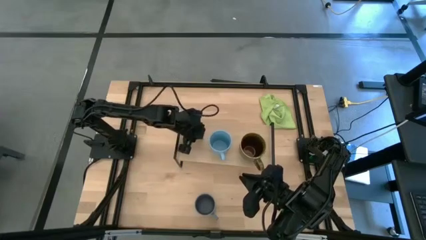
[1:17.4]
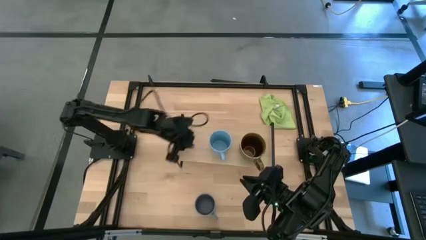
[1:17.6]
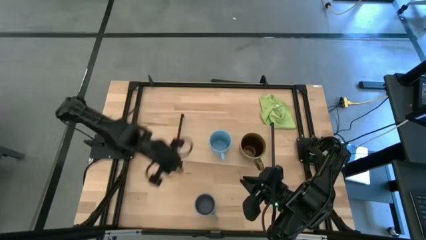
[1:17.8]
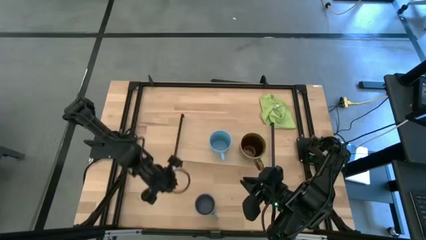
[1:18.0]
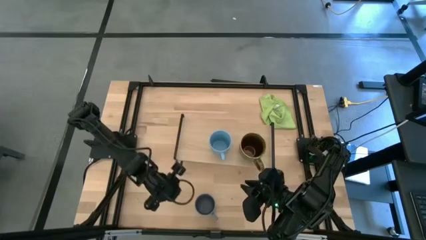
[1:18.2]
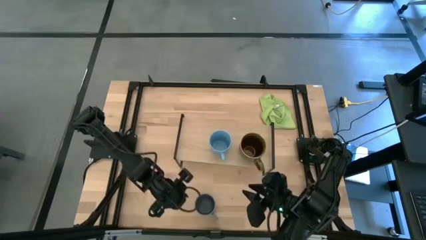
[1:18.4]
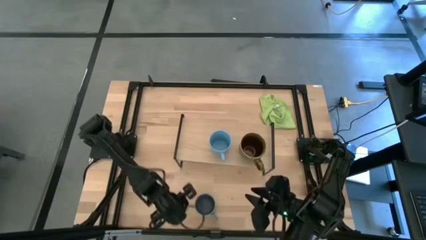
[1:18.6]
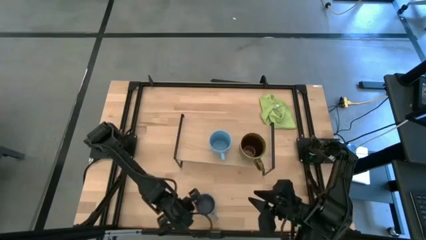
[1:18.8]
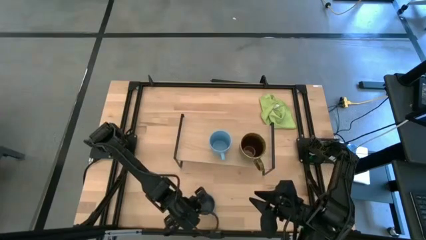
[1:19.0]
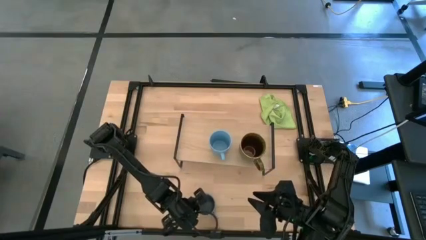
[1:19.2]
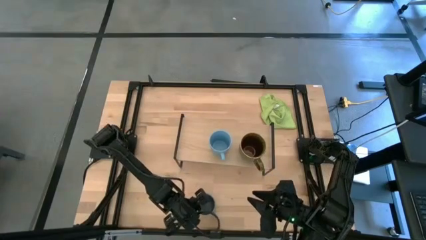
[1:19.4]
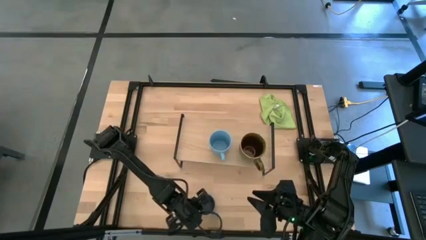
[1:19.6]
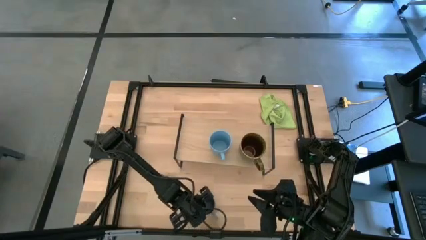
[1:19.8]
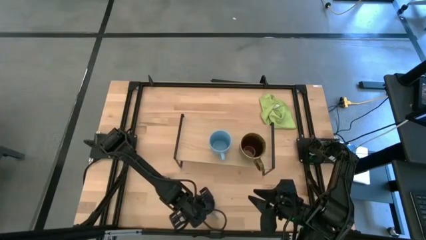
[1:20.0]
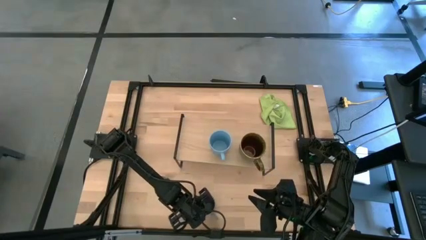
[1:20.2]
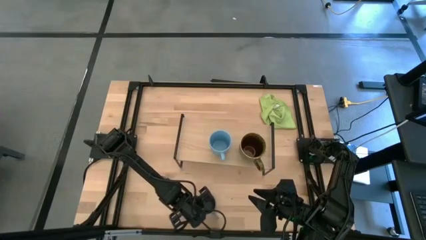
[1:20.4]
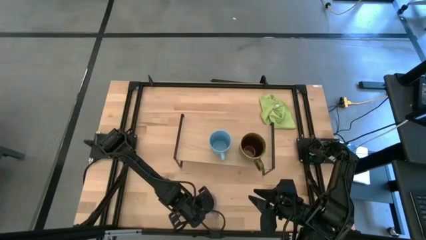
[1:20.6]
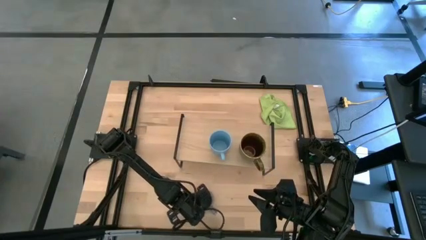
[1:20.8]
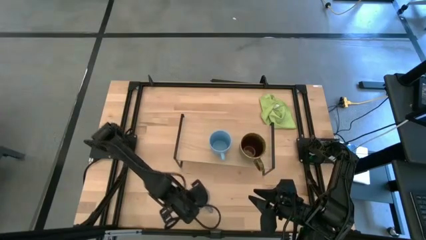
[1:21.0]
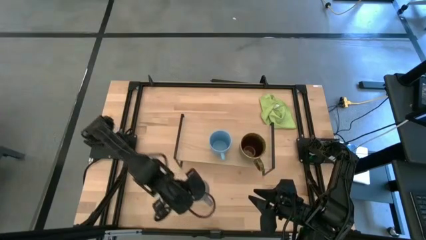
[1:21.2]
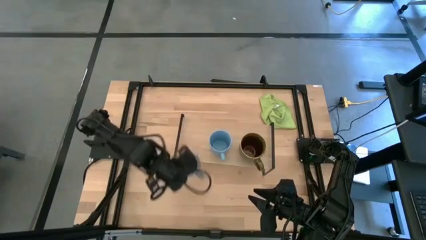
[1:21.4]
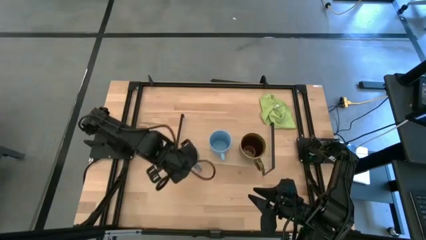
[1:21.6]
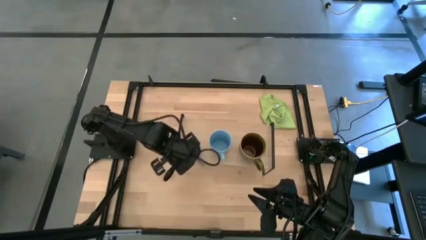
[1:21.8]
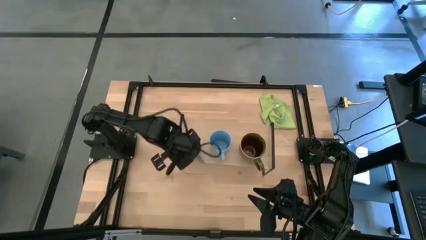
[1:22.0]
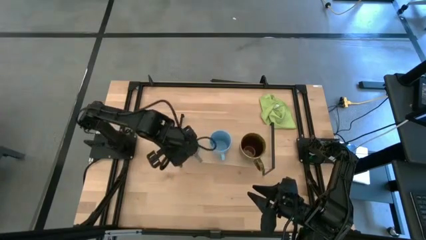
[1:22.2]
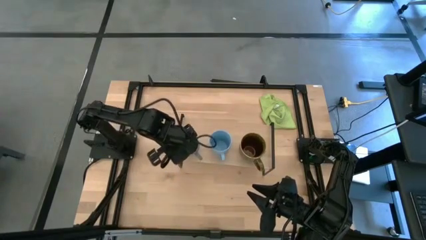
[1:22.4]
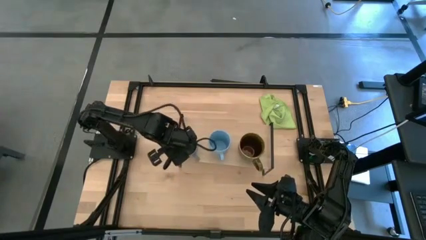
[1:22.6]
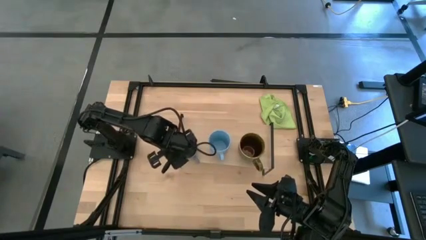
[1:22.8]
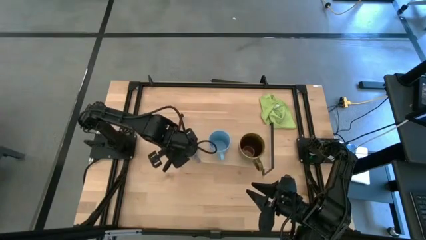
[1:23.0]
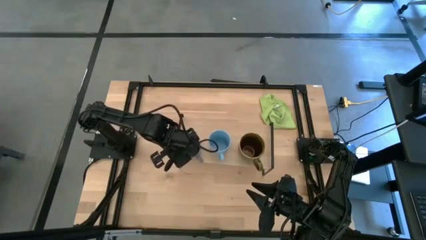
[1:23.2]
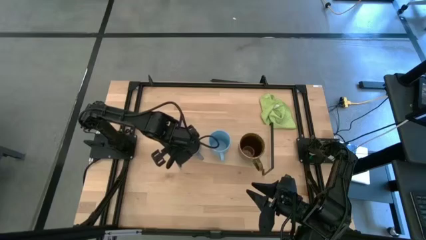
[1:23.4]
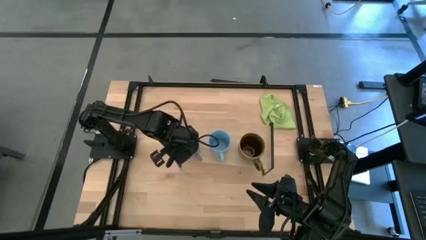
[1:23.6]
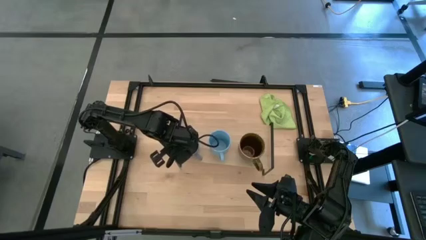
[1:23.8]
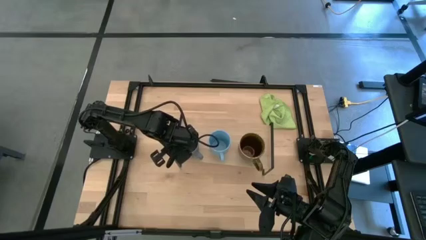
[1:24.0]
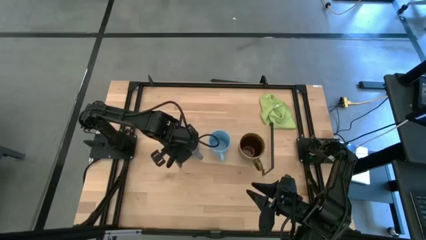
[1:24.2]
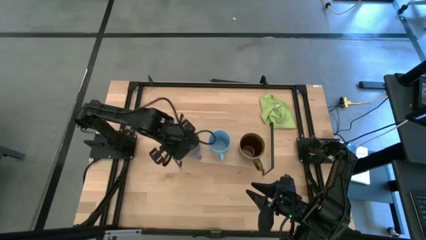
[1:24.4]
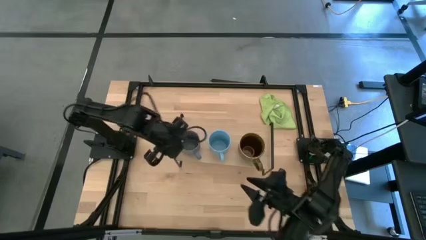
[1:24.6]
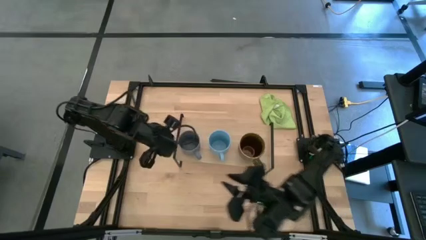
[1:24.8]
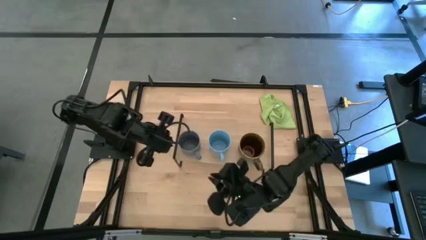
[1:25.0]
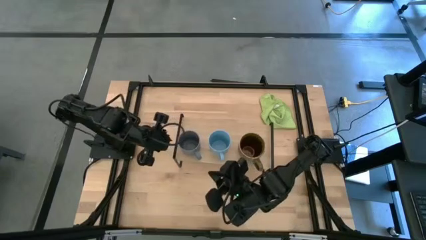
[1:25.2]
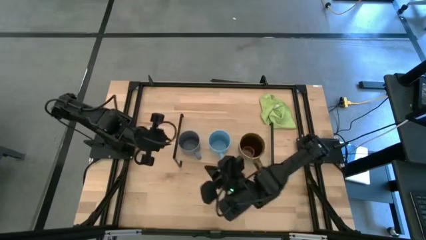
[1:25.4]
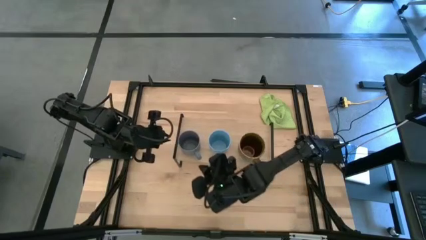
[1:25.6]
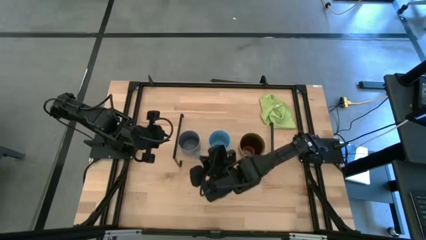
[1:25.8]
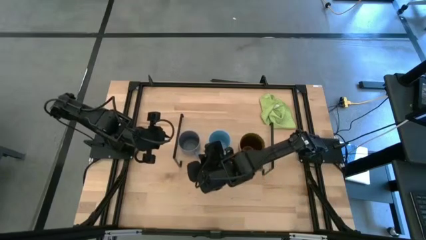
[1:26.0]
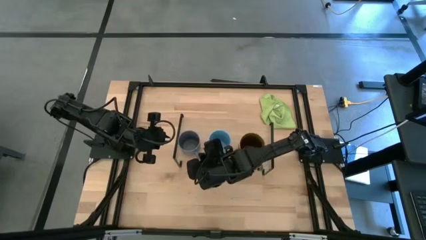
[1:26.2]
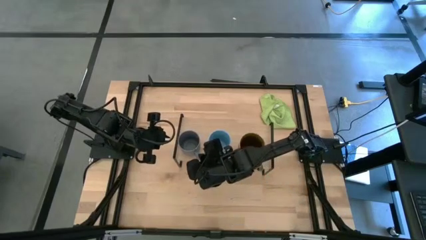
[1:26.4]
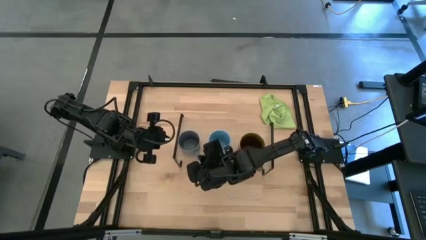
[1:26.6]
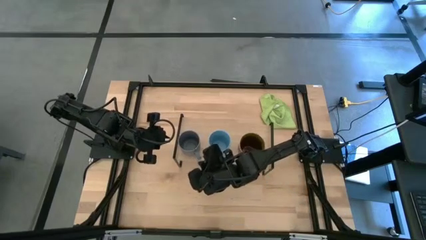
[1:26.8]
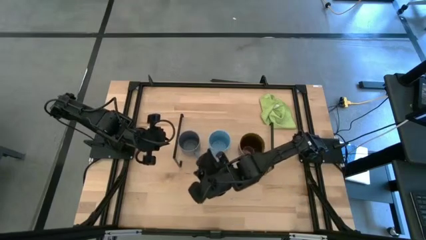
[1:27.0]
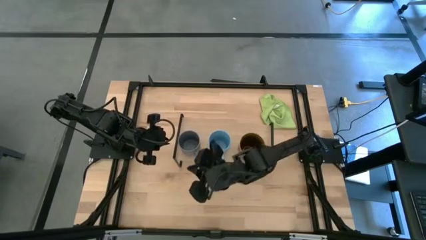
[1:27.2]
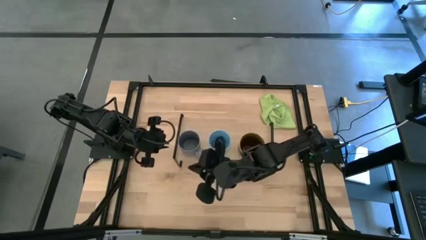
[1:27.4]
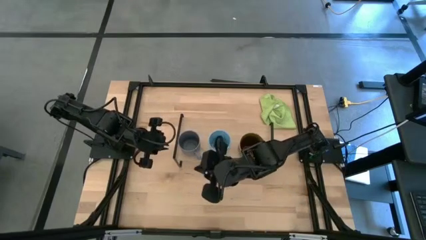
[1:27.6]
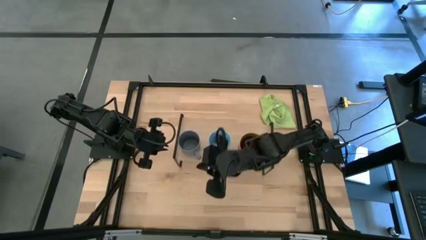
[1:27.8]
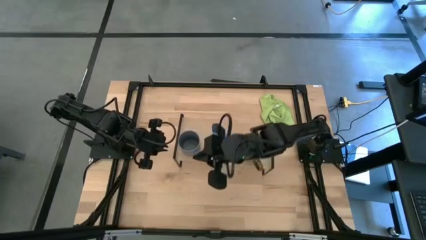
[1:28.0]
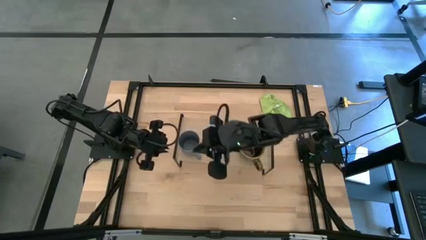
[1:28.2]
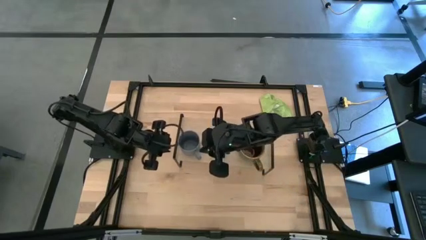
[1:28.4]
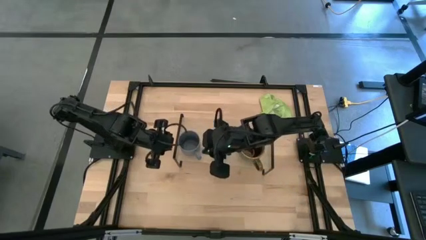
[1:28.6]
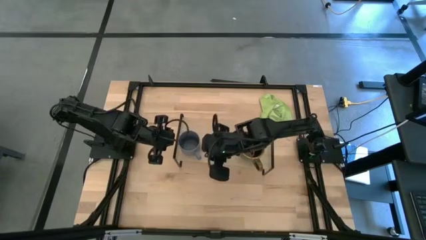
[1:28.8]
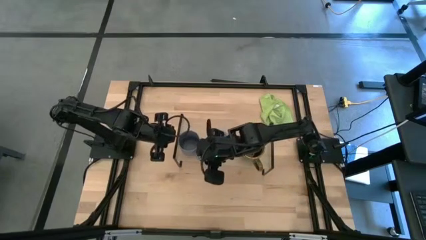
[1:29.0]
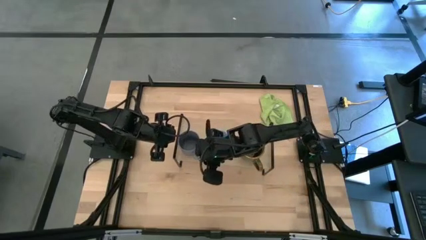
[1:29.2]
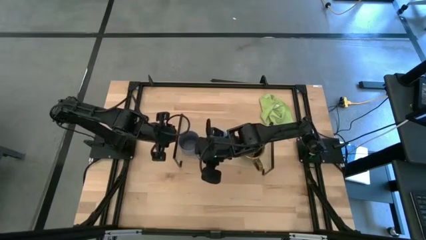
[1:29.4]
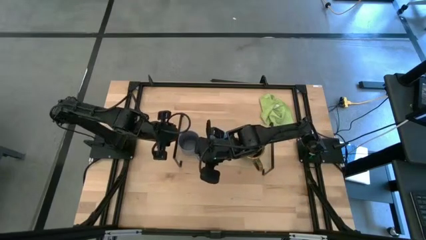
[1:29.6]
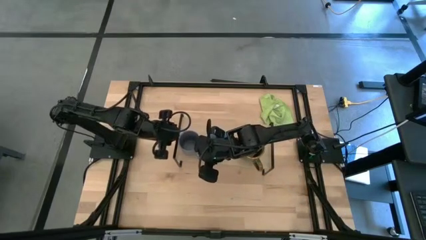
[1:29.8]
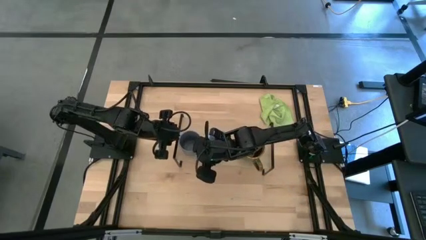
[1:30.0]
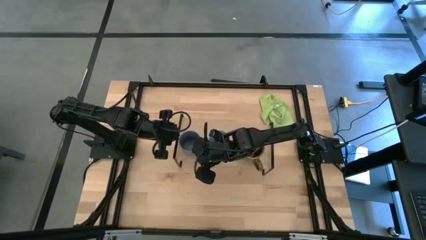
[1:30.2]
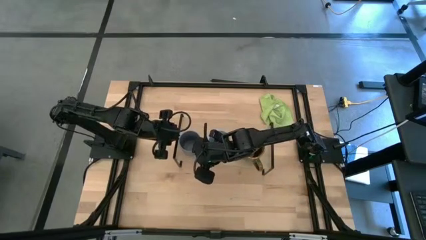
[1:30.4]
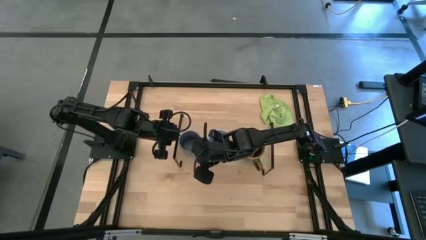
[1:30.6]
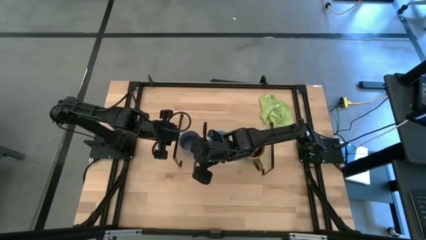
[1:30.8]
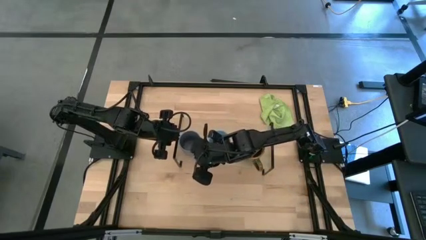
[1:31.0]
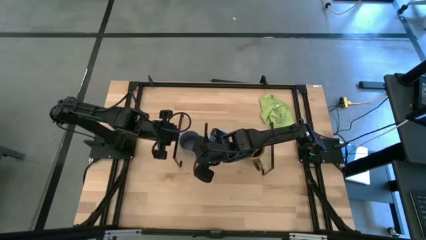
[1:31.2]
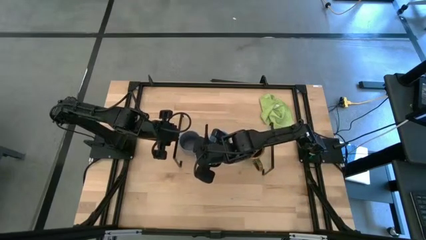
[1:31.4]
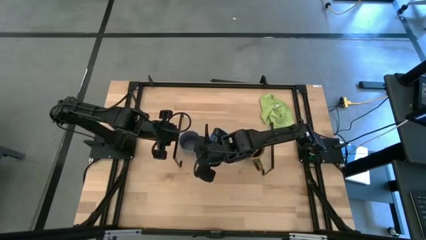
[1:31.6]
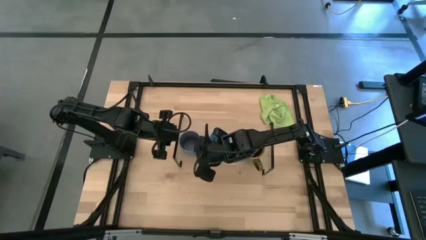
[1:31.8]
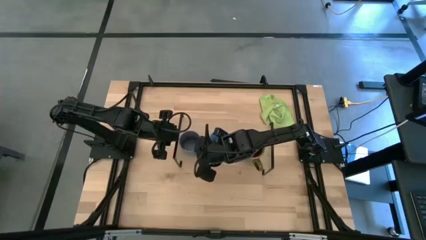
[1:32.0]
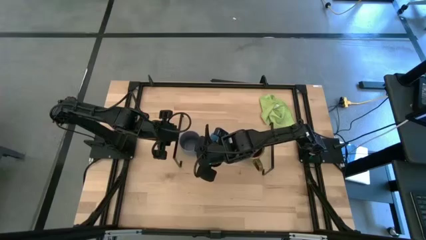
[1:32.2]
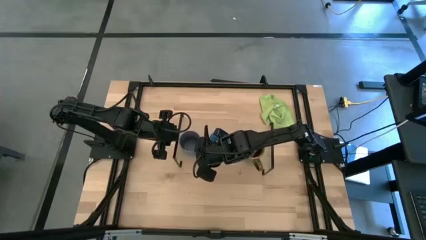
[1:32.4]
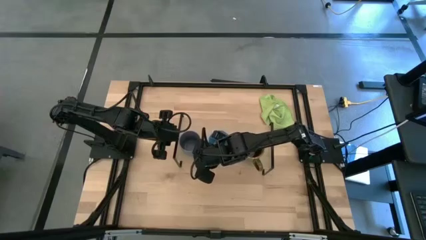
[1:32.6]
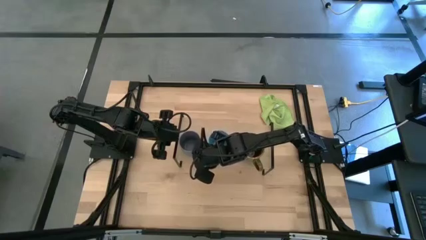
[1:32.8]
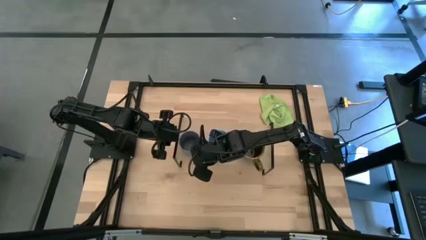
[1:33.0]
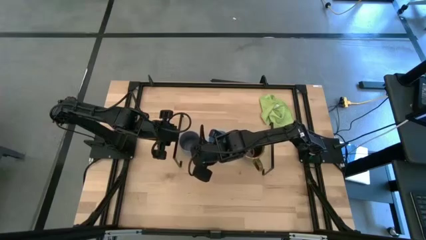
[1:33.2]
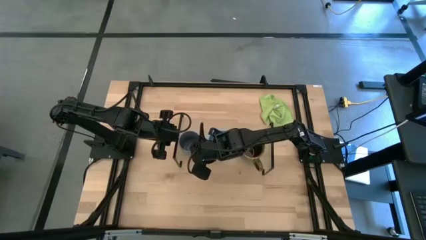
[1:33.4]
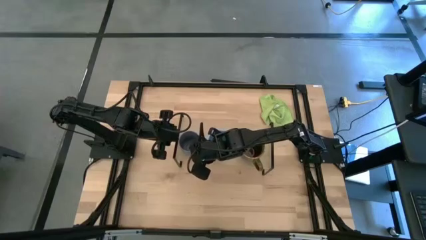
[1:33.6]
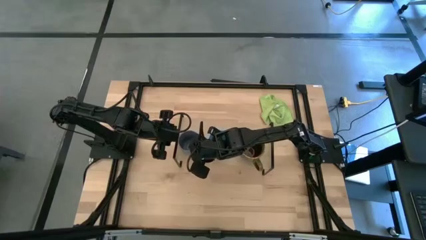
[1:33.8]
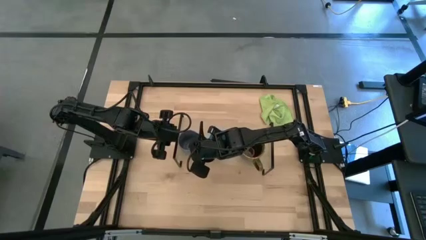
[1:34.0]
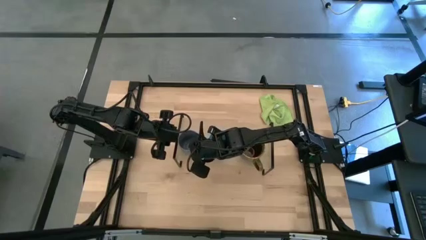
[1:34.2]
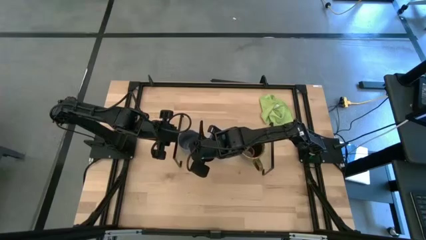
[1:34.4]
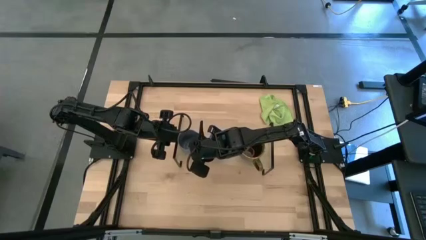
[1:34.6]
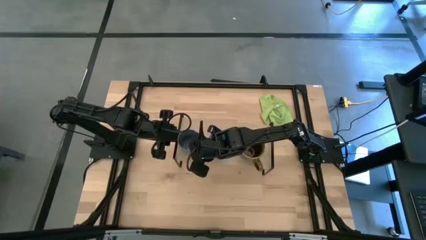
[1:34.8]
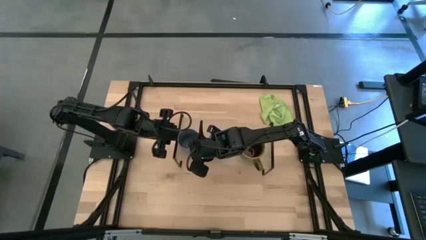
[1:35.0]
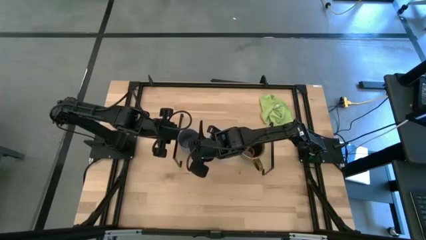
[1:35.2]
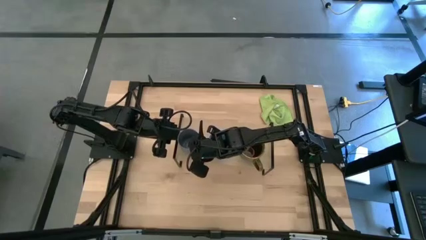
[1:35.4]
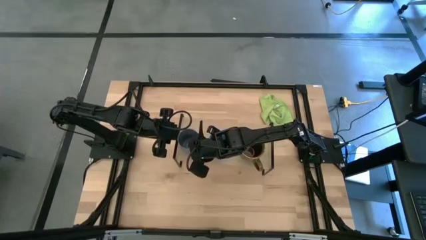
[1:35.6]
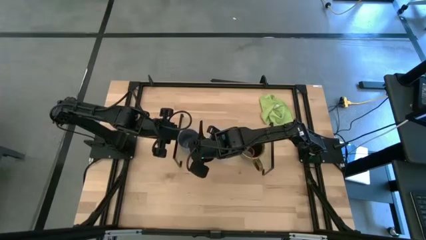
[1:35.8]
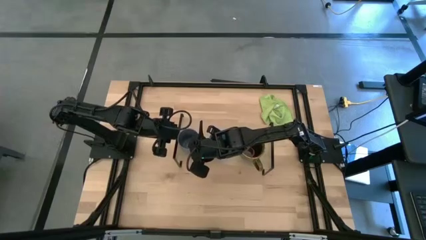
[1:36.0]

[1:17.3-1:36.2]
Task: Stack small to large cups/mugs on shelf
Put the gray mug on the shelf
